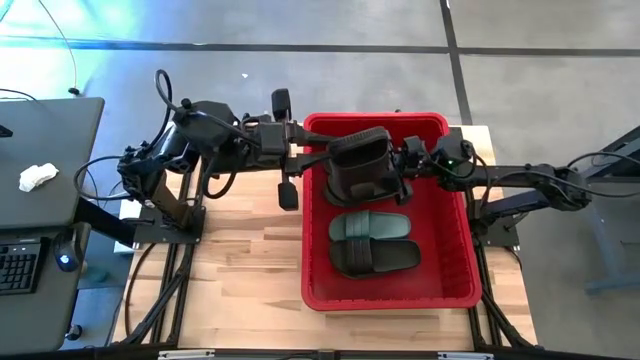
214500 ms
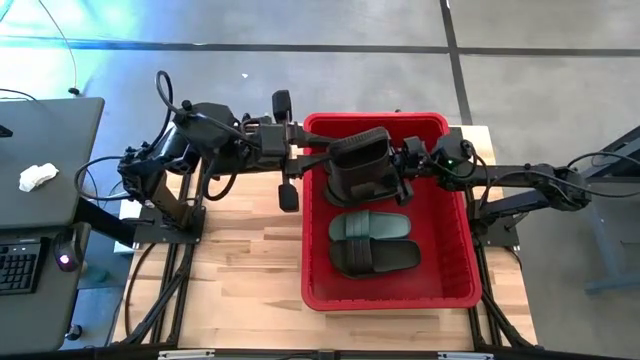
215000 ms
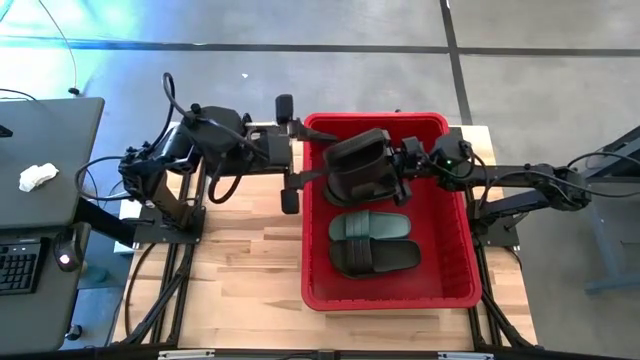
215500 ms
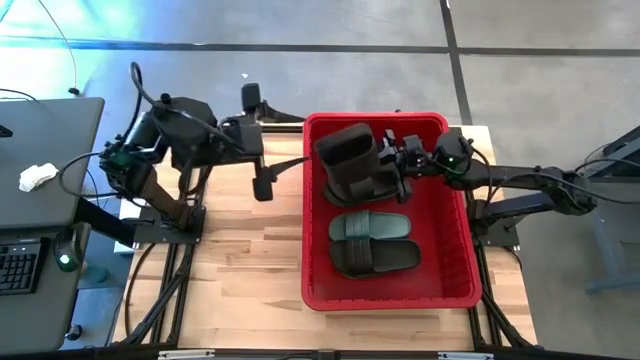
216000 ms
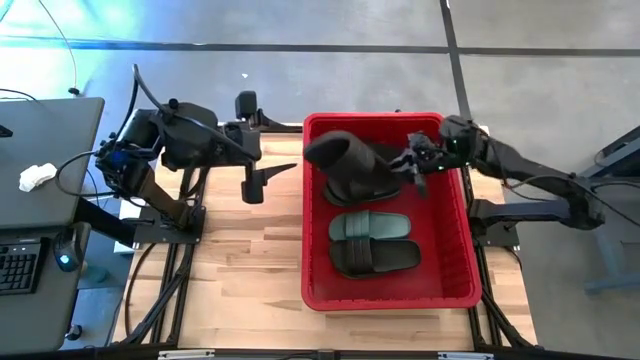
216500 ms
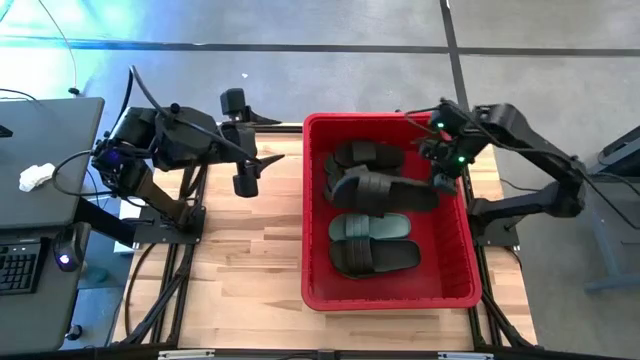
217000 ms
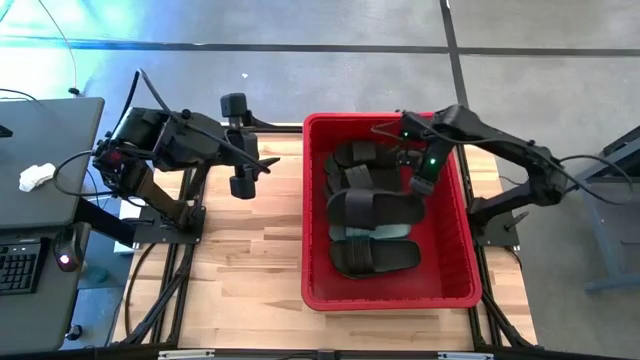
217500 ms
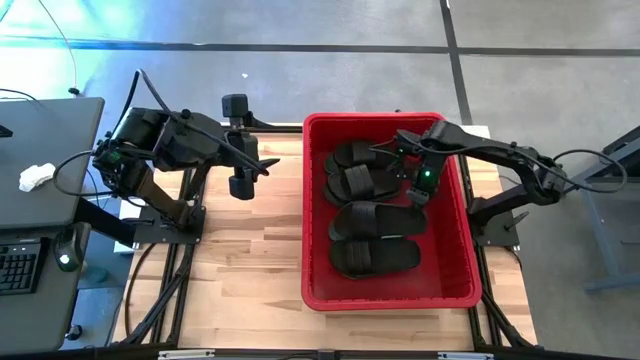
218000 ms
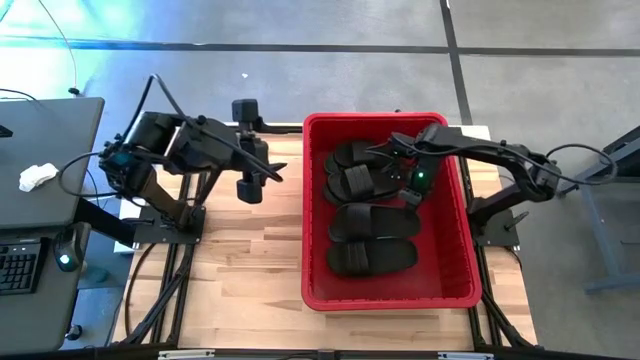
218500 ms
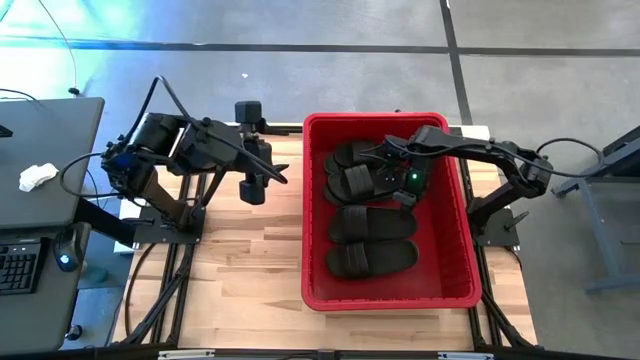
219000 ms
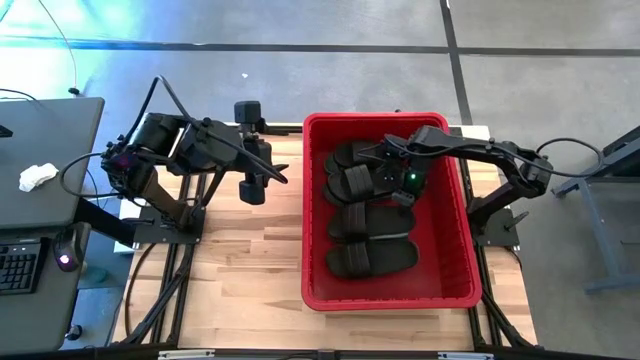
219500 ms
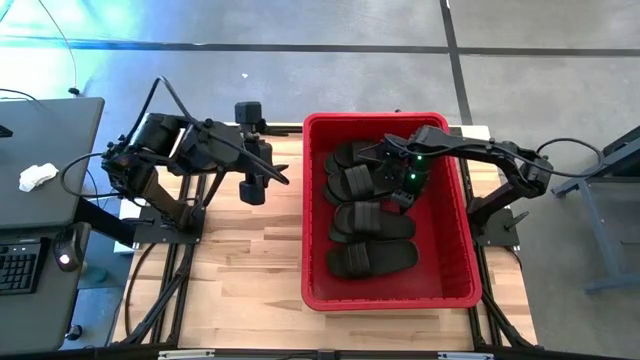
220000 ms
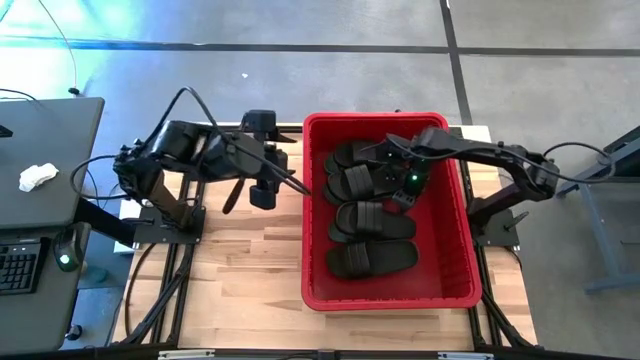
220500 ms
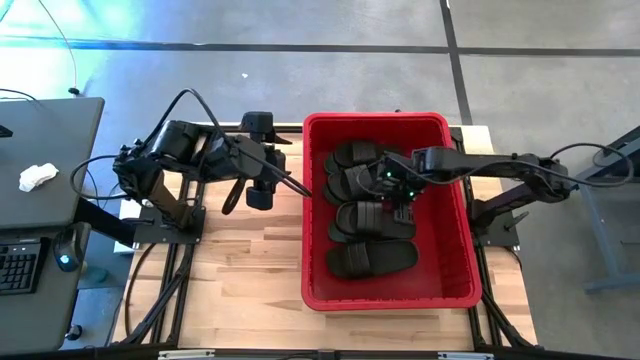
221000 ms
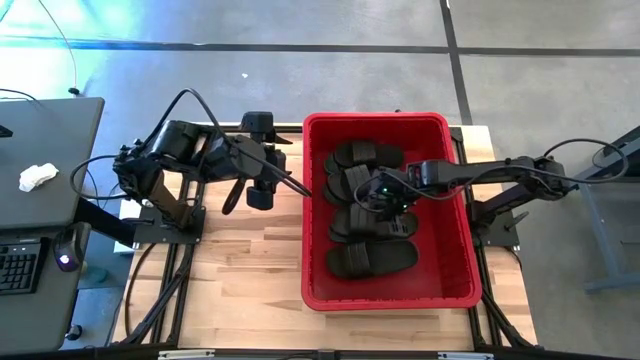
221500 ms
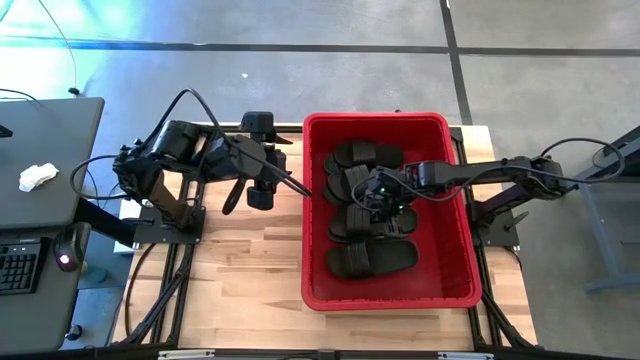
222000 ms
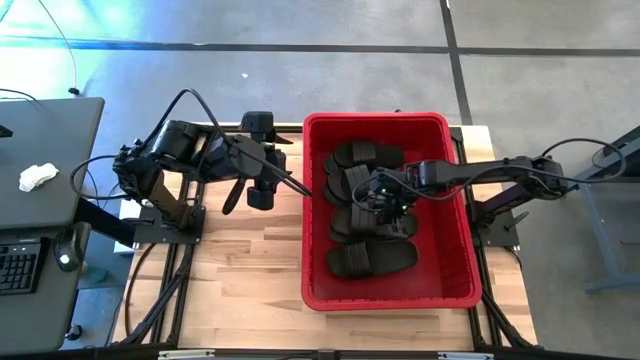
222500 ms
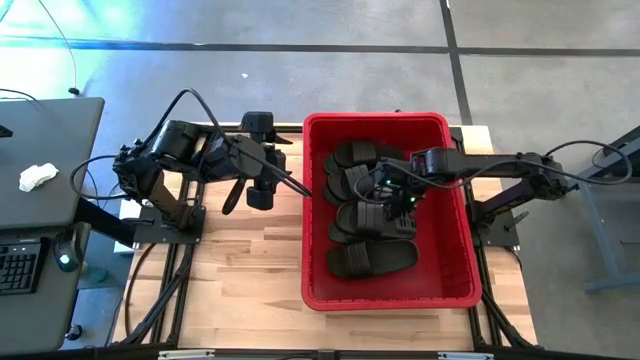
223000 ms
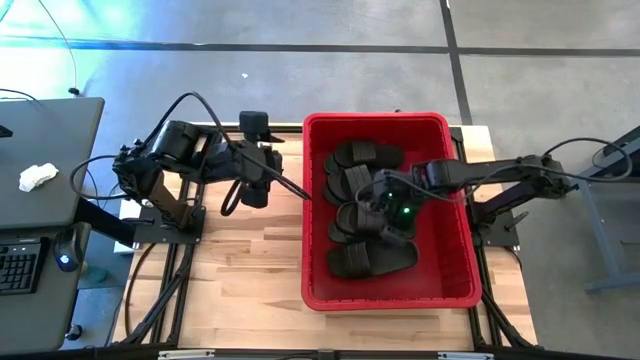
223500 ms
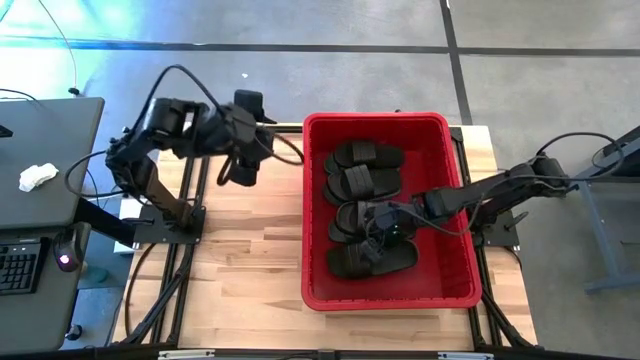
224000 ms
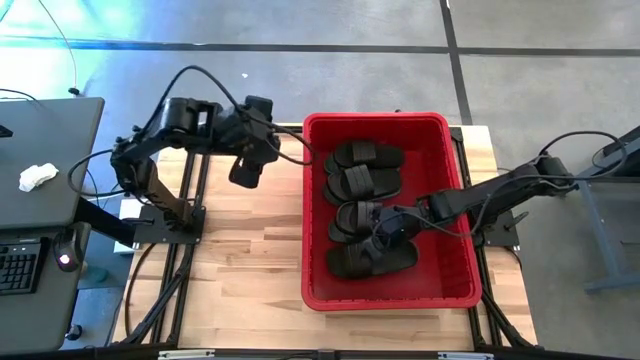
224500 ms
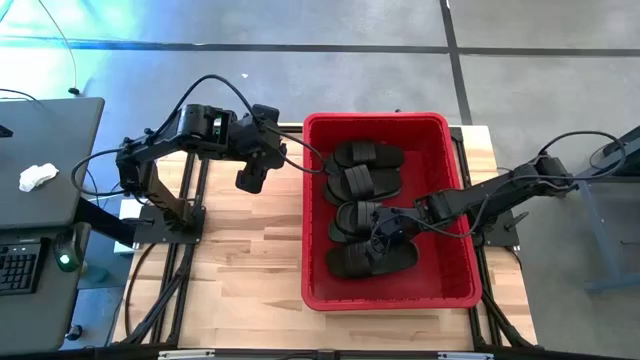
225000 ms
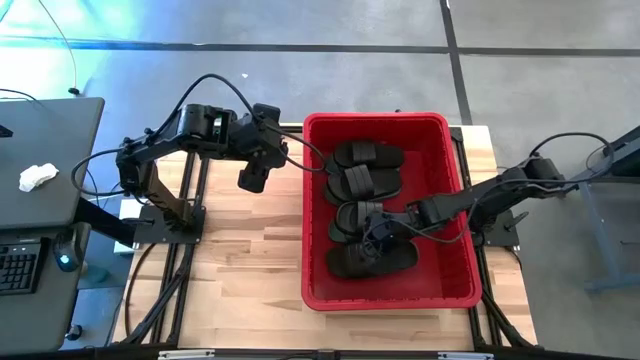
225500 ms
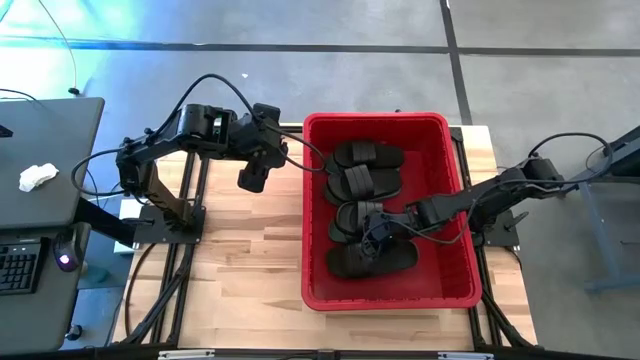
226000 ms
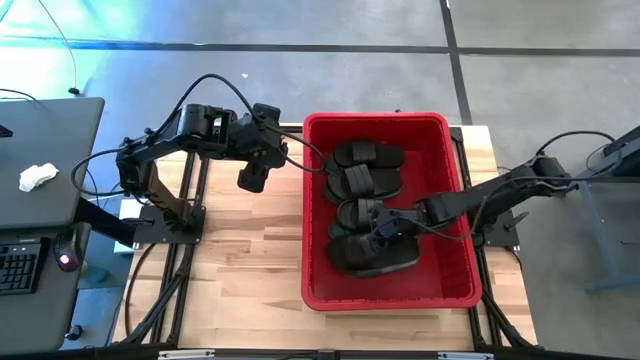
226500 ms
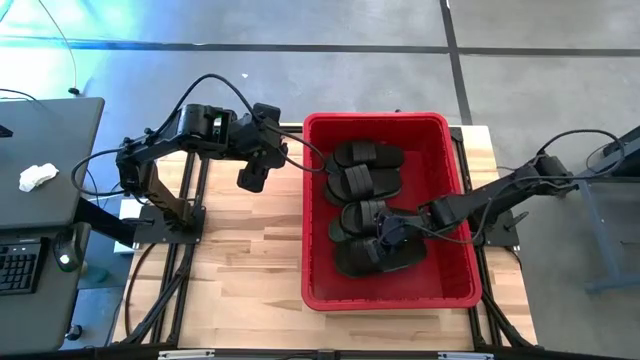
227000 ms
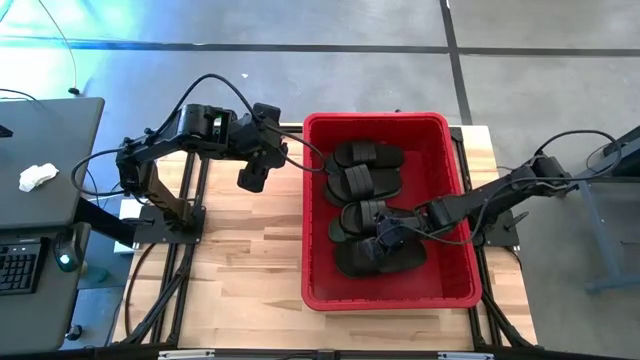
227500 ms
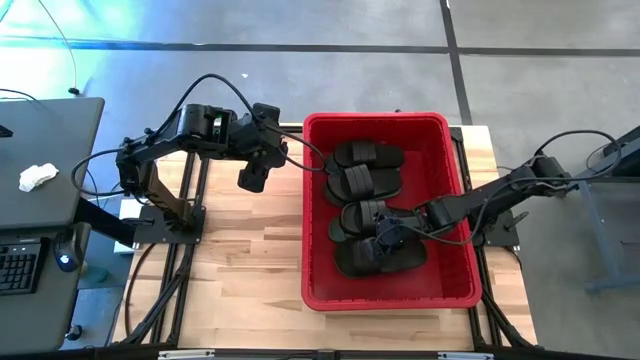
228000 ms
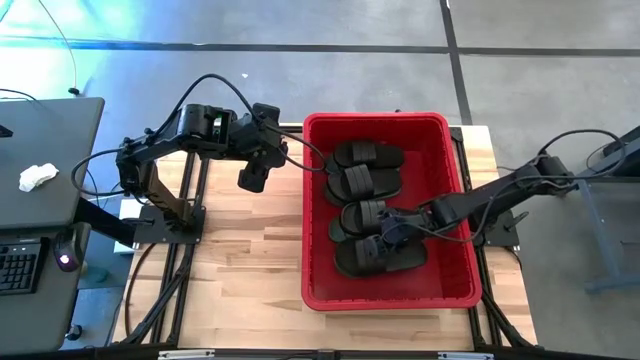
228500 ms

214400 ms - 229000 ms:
Task: Pick and place slides into bin
Put the black slide into the red container

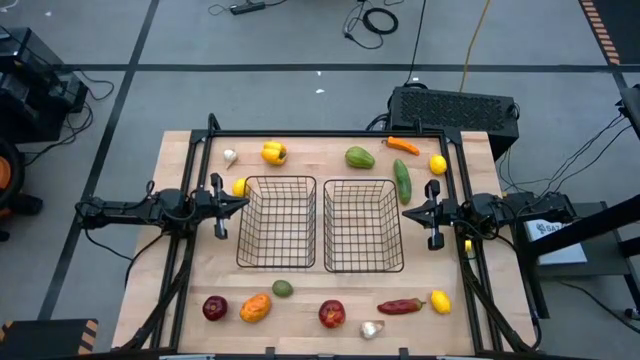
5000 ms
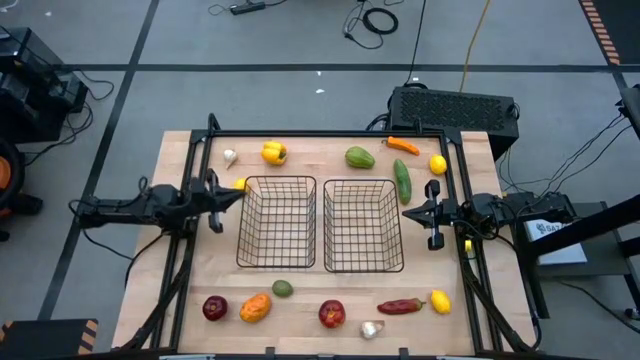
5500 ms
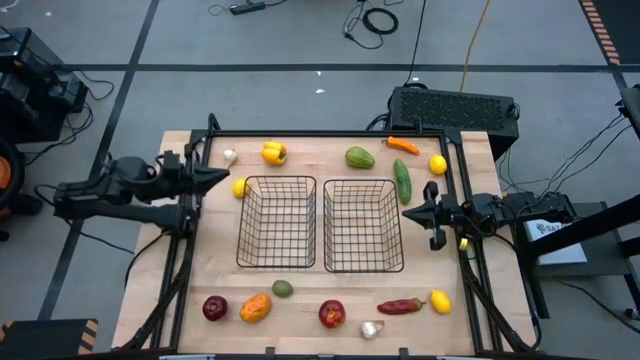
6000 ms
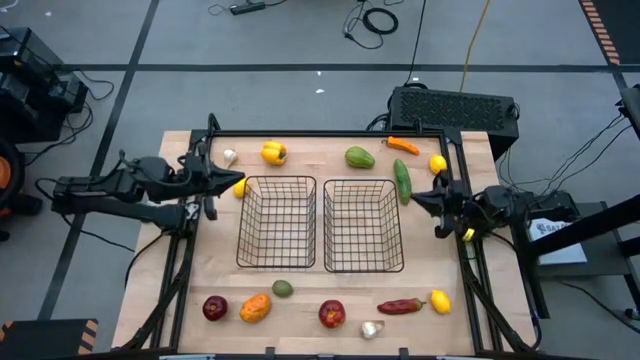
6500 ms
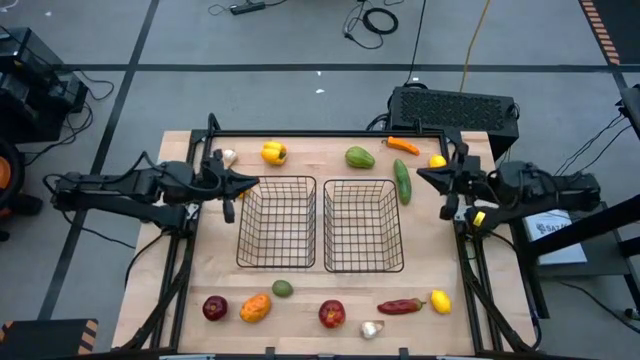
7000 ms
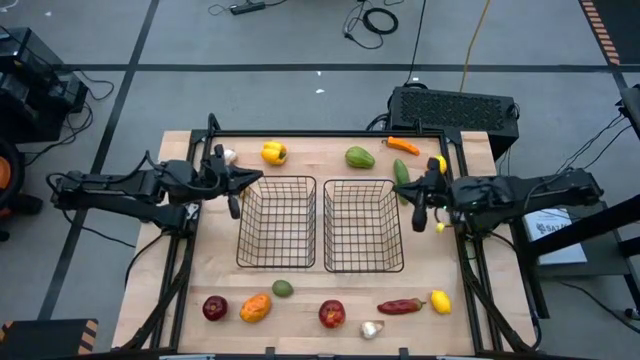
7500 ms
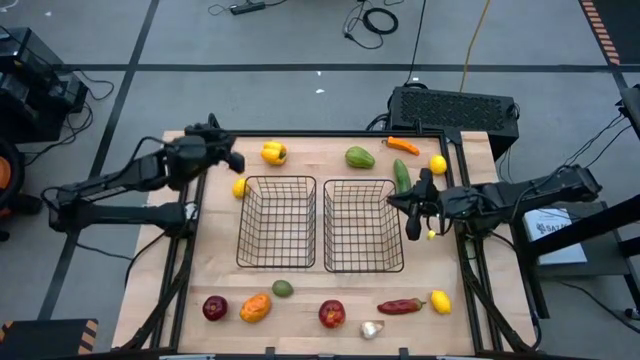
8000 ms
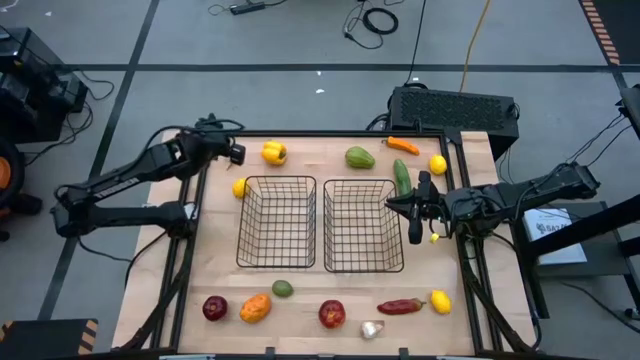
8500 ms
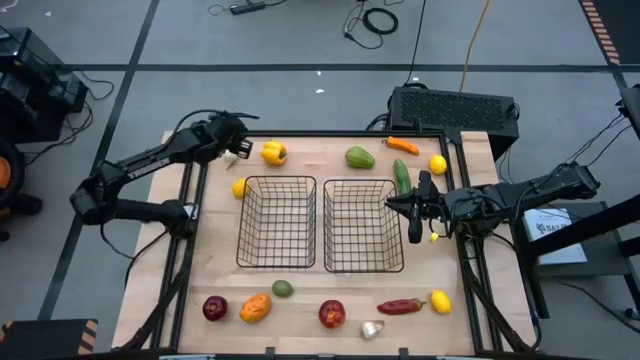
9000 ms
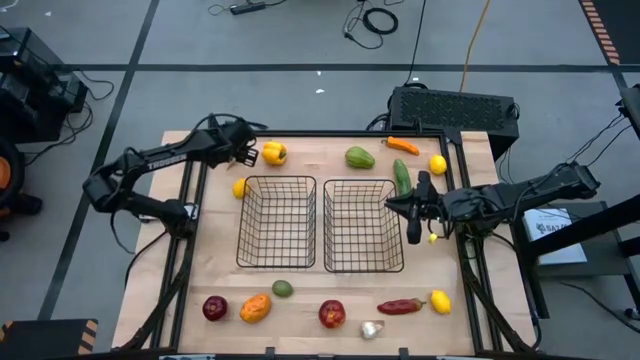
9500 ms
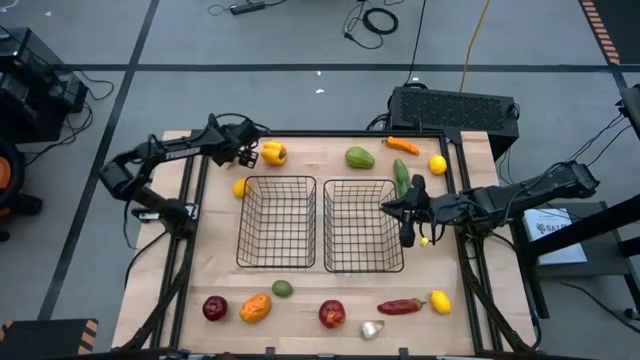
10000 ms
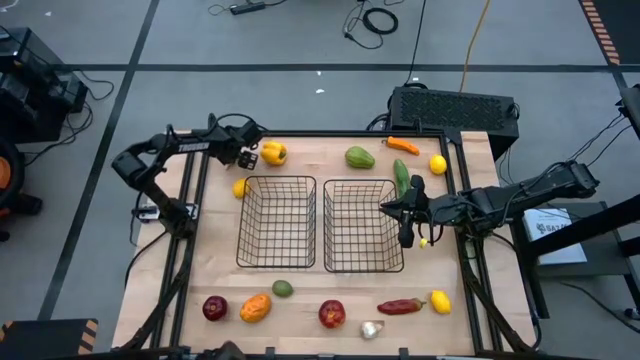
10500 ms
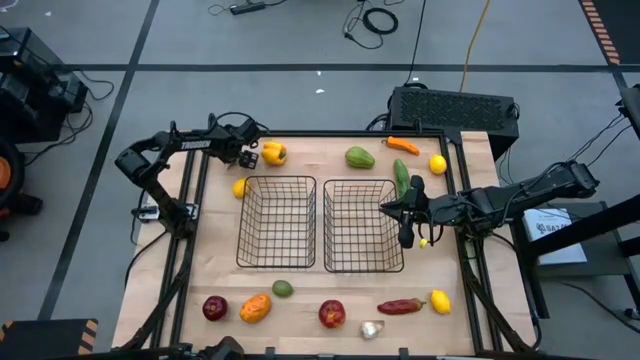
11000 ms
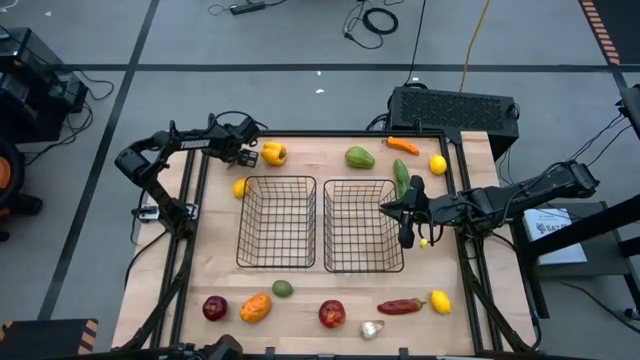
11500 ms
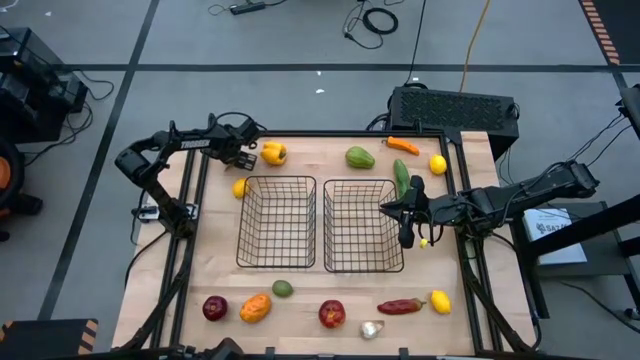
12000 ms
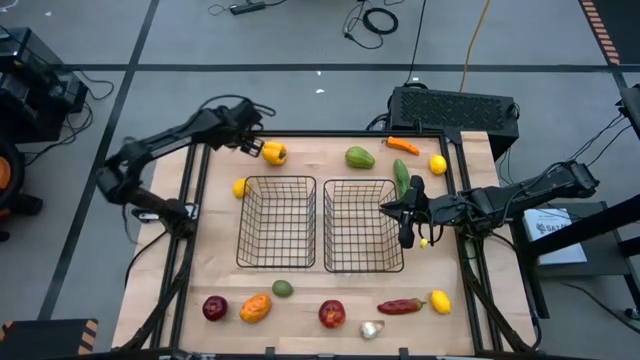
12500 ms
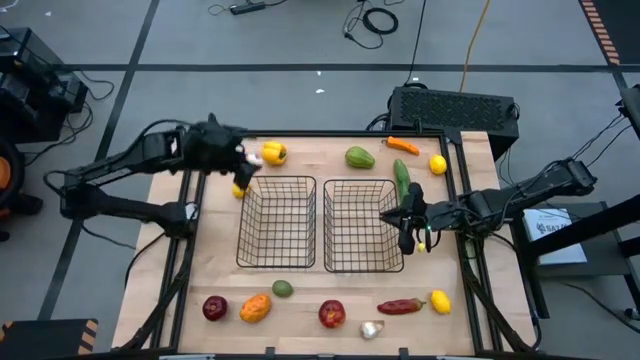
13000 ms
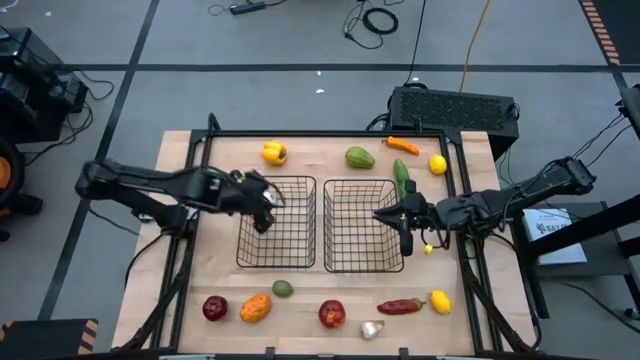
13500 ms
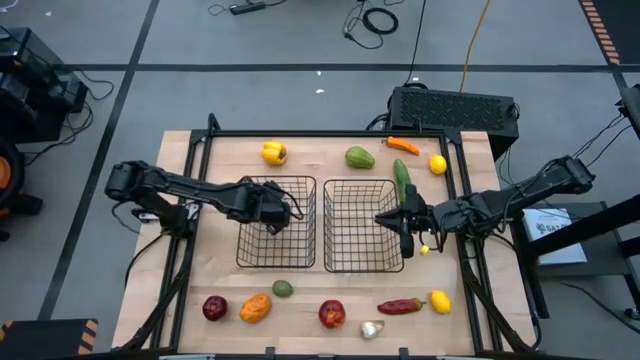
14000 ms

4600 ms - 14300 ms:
Task: Sort produce into baskets
Put the top white garlic into the left black wire basket
